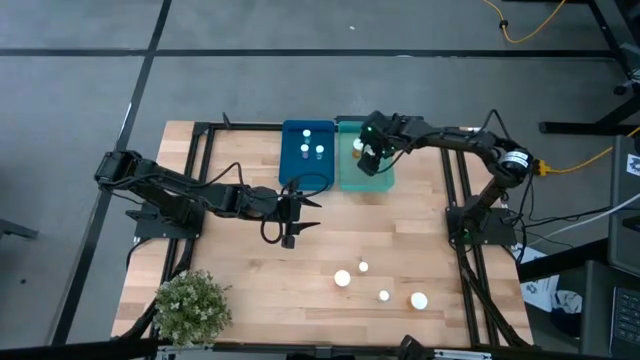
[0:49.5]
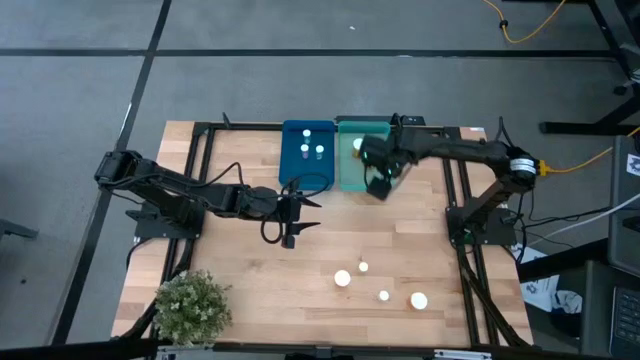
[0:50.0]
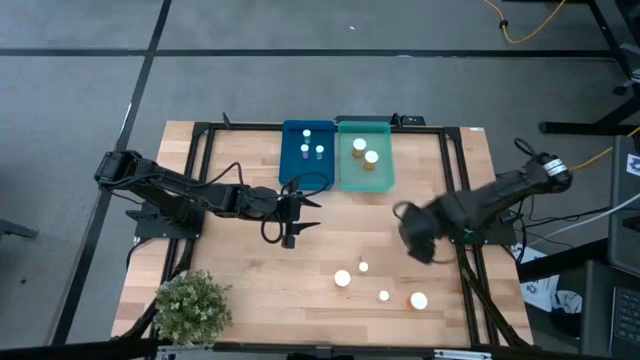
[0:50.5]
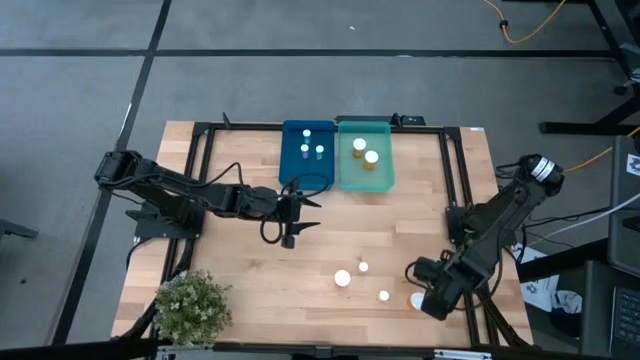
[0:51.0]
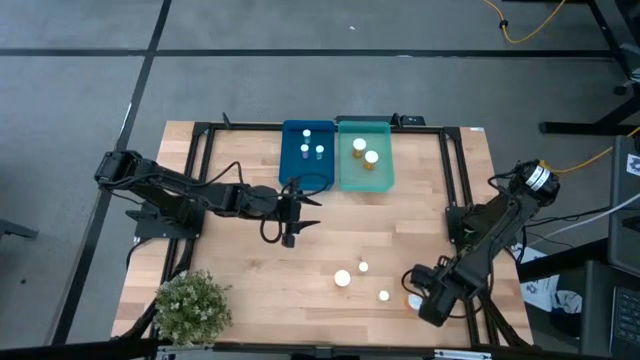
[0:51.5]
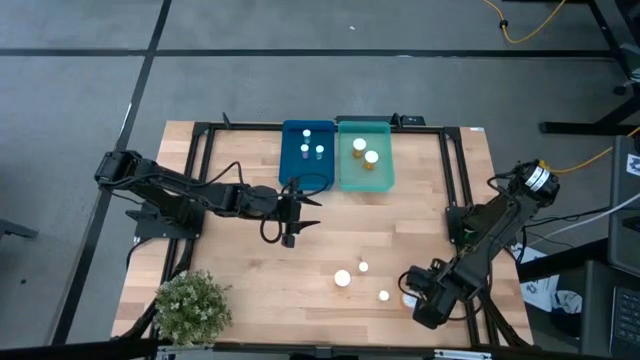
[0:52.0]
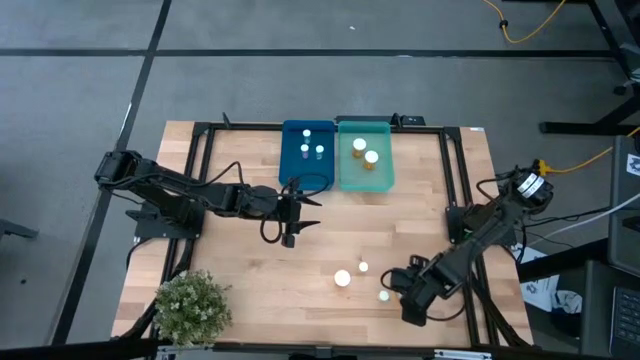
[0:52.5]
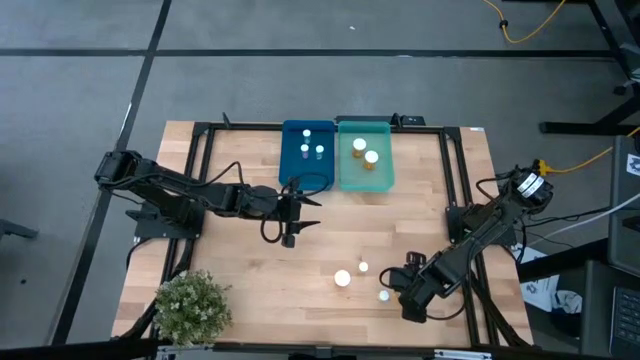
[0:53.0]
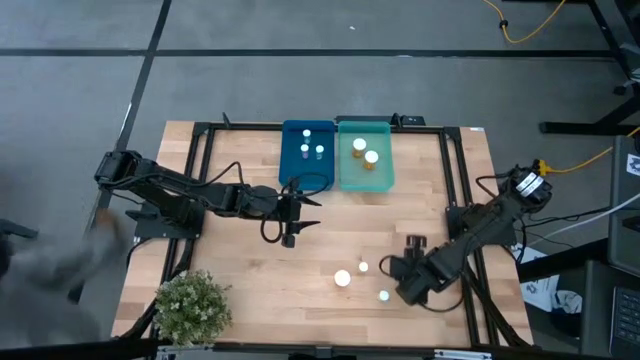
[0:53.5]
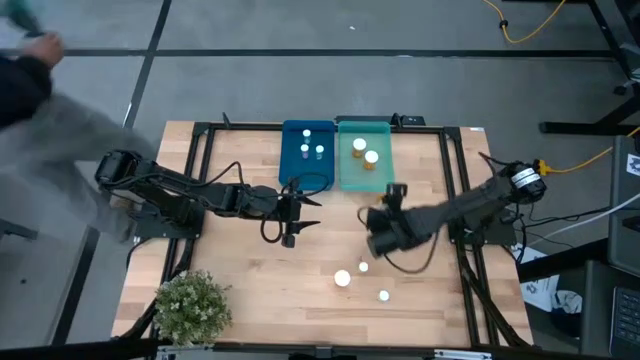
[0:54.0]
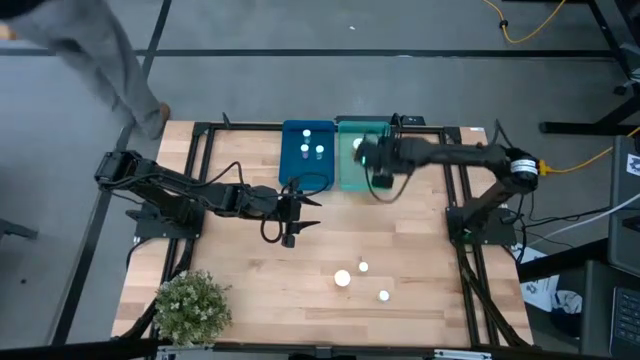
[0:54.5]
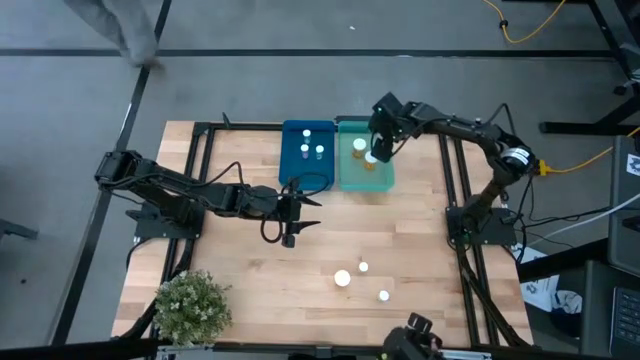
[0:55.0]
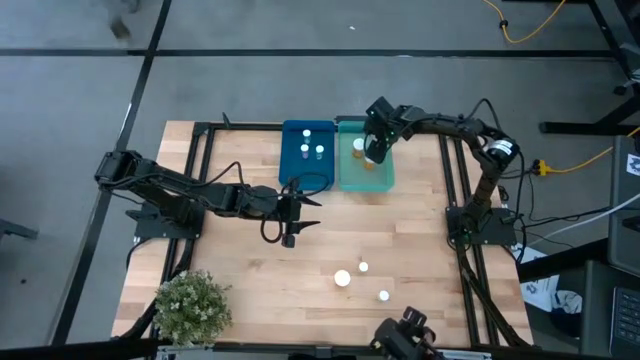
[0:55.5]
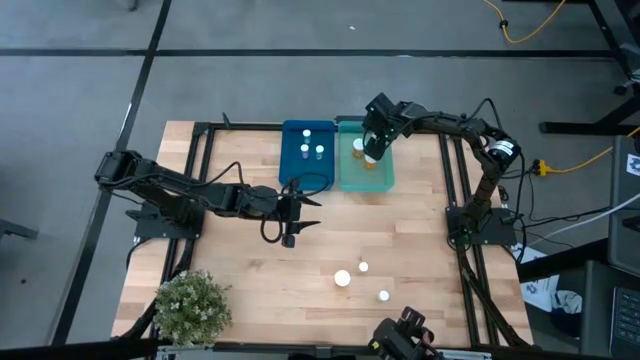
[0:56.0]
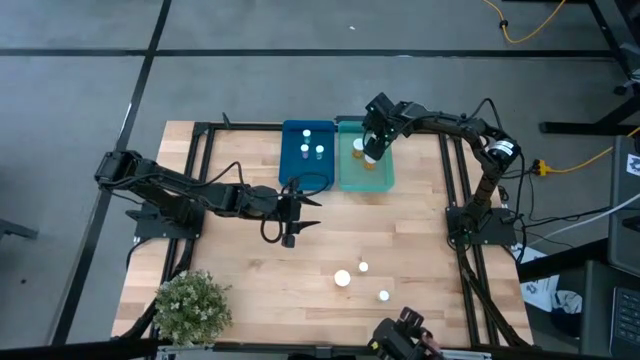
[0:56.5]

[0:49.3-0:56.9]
Task: Pick and place medicine bottles into bin by pill shape (circle, oval)
Put the orange pill bottle into the light blue bin

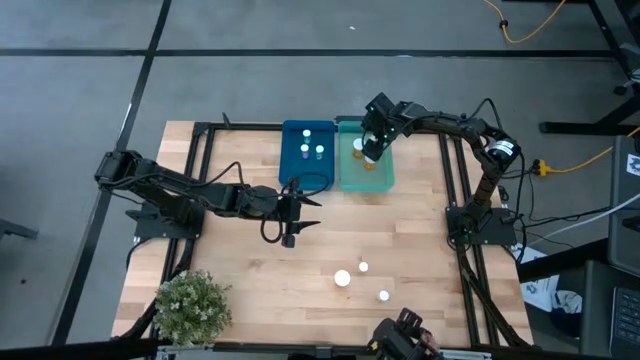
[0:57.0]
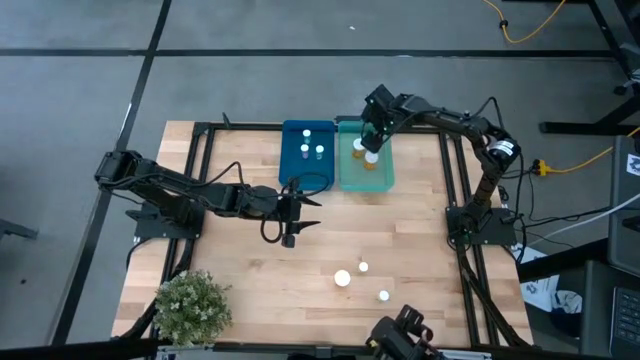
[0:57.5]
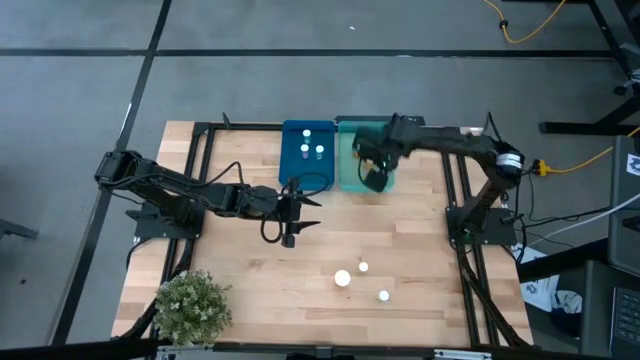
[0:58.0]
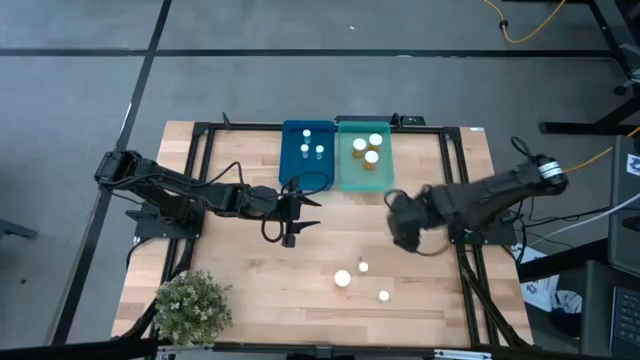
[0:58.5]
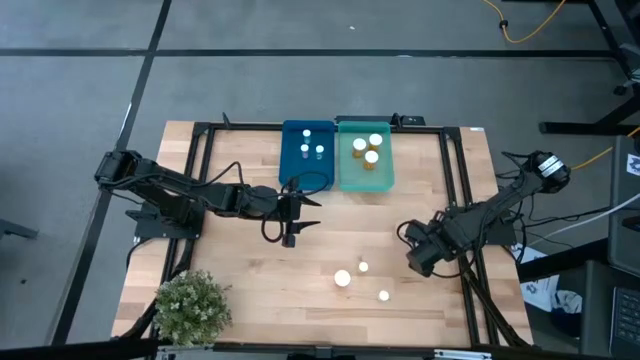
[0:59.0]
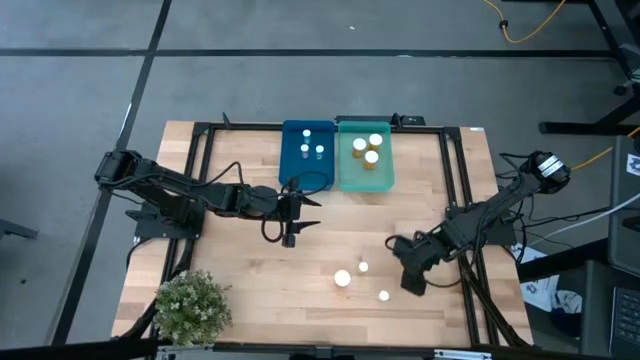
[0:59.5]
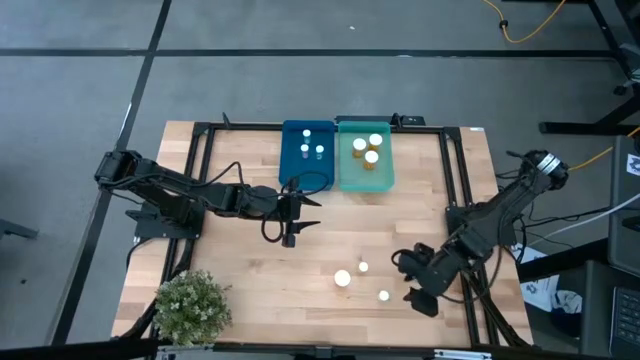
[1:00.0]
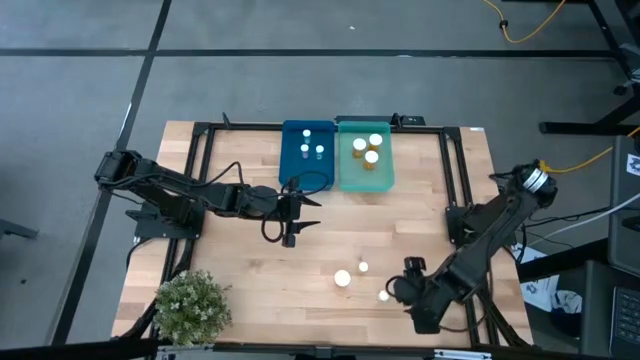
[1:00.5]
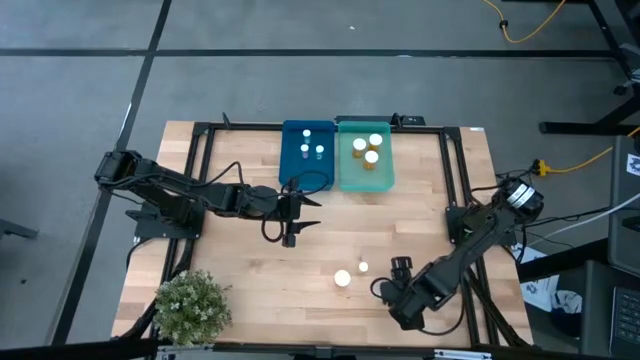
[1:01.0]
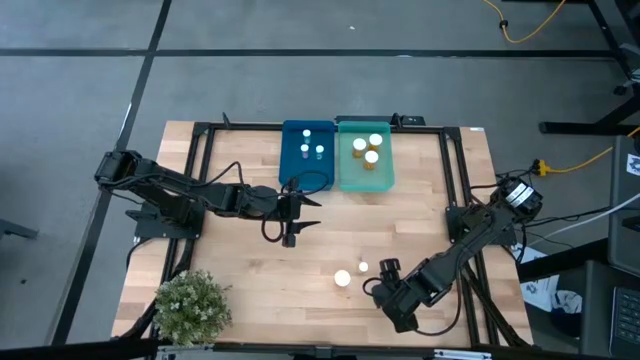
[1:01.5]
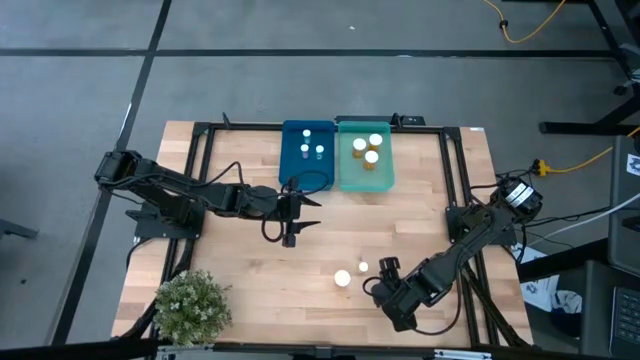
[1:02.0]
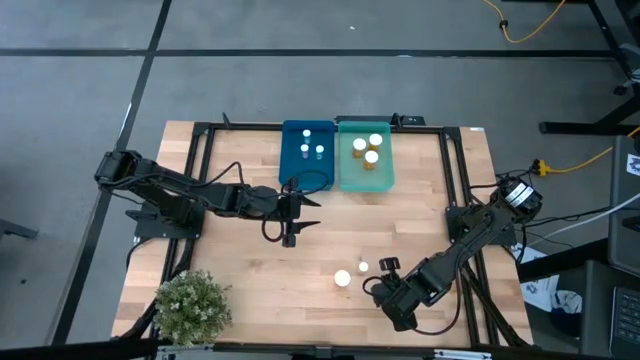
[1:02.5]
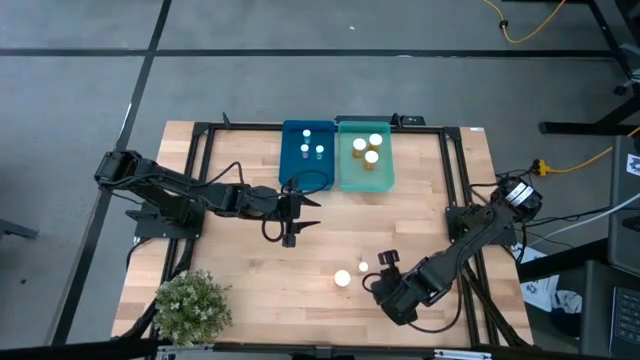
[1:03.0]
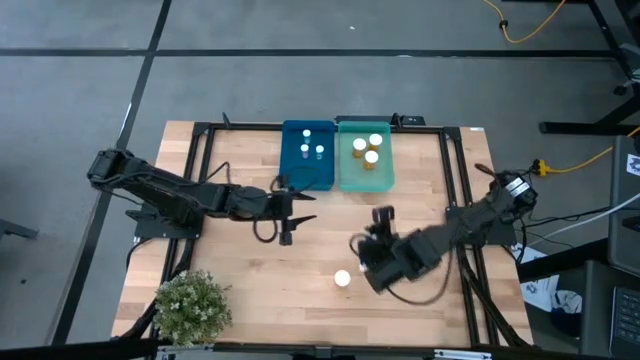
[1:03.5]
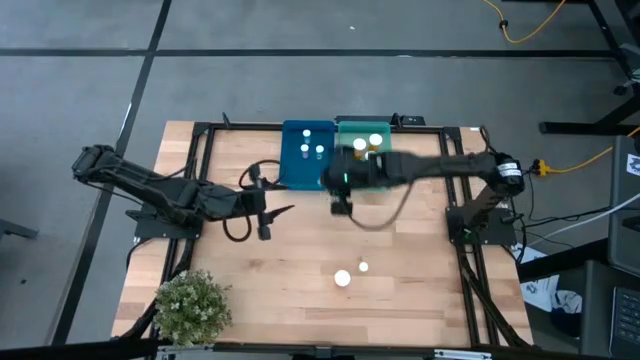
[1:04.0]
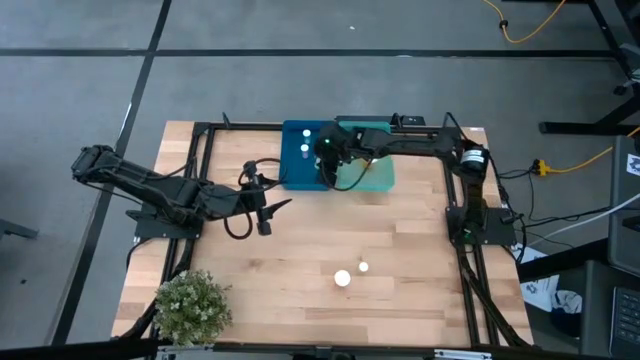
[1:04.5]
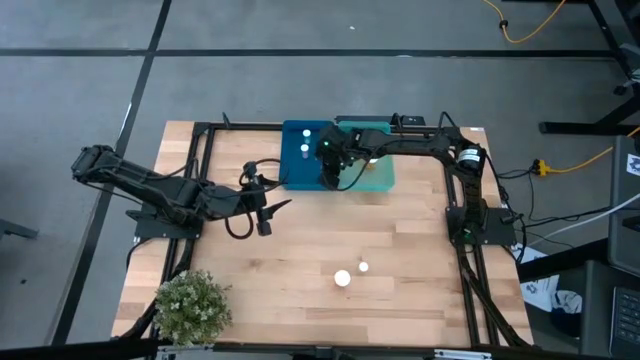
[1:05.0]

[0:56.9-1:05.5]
Put the bottom yellow pill bottle into the blue bin

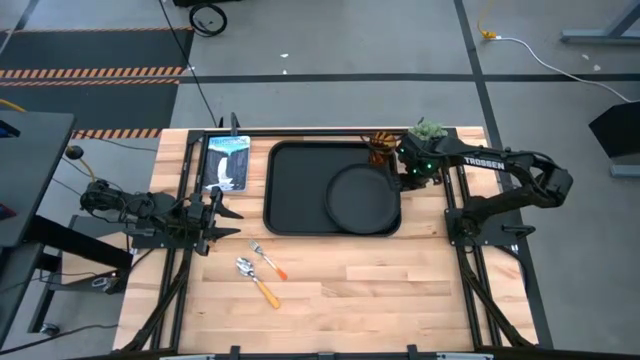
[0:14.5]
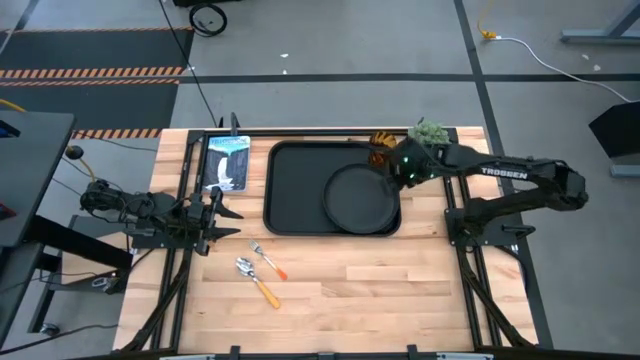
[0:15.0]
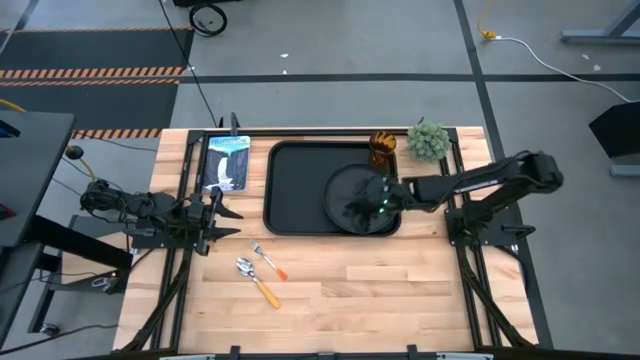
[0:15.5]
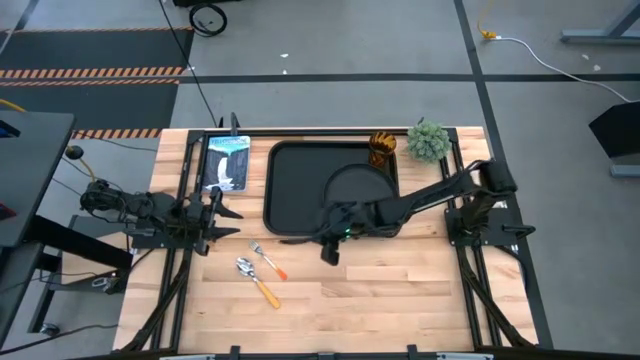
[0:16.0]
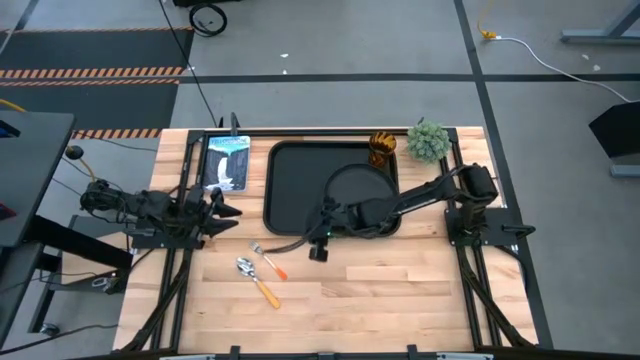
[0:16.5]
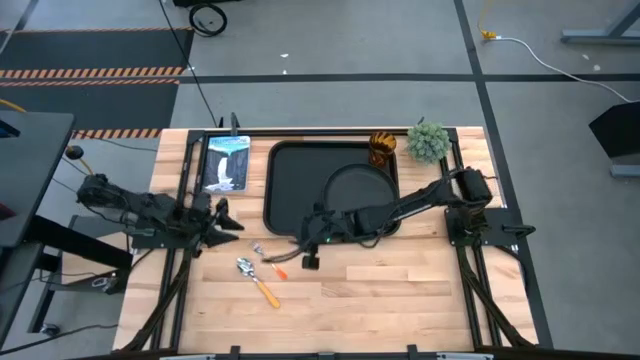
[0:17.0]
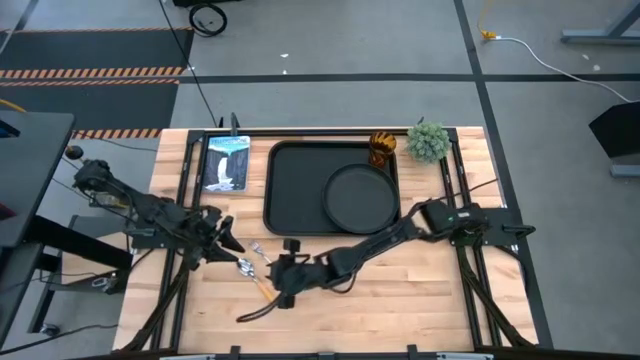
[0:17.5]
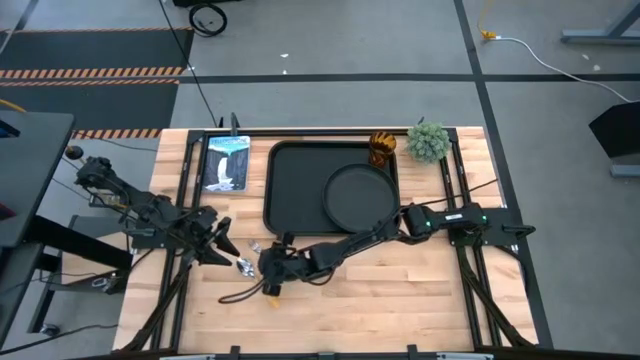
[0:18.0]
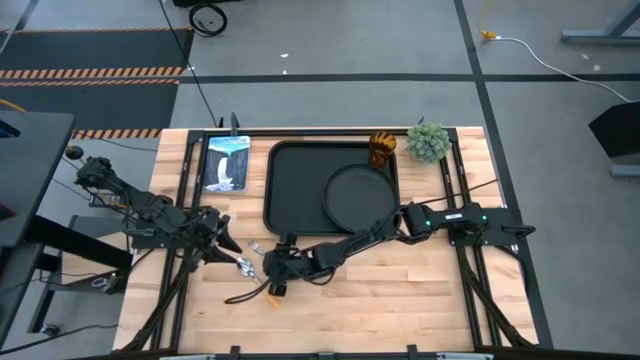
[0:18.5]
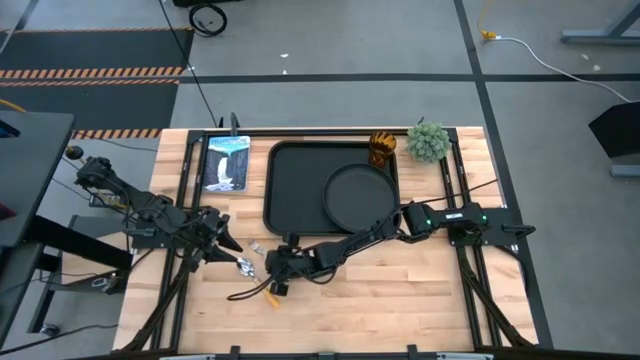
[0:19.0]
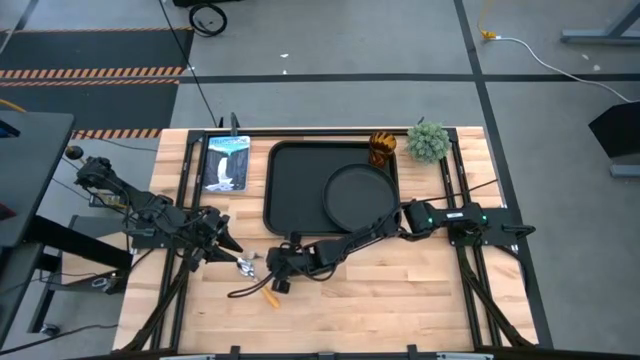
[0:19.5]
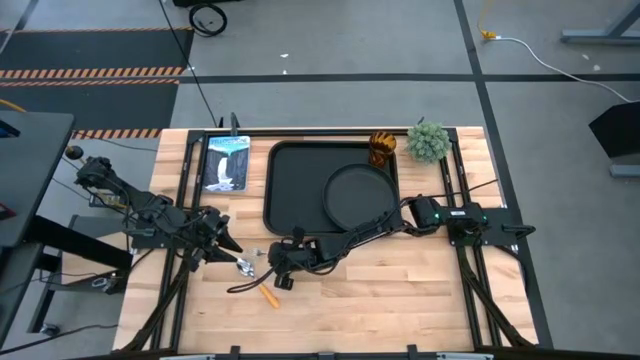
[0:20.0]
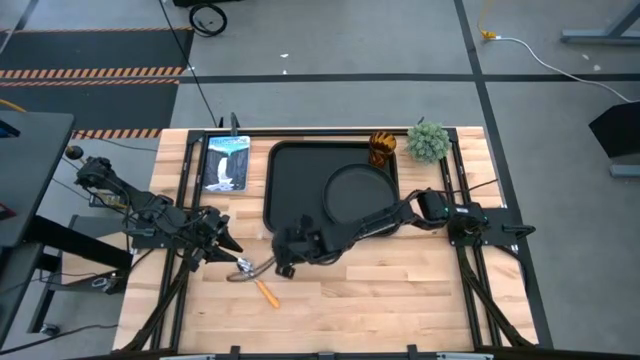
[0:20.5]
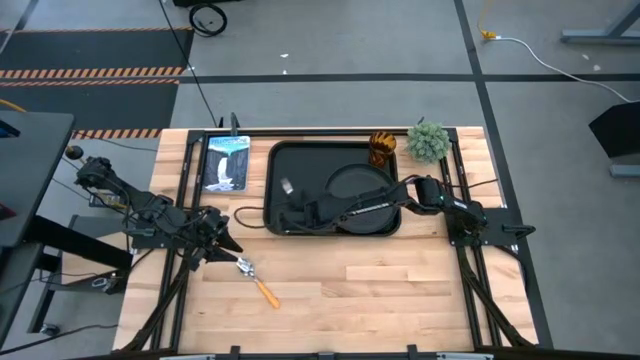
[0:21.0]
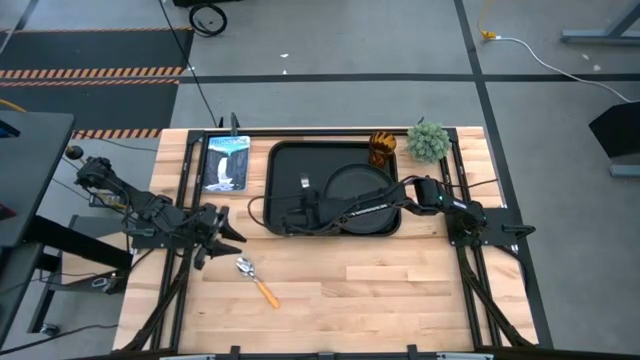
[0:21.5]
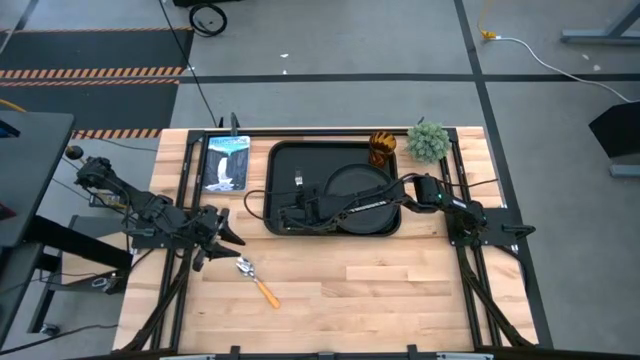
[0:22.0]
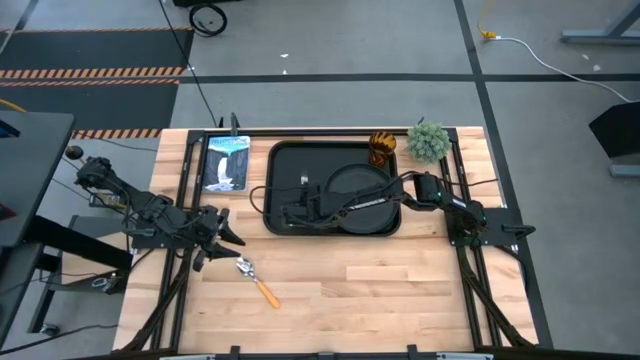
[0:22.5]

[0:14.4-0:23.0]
Task: Pick and place plate/cup/fork/spoon on tray
Put the orange fork on the black serving tray to the left of the black plate
